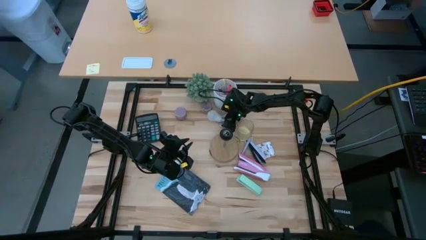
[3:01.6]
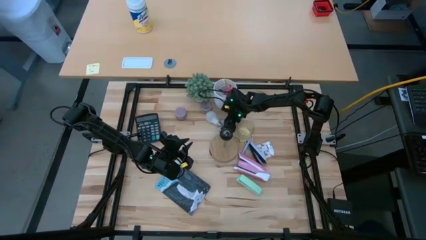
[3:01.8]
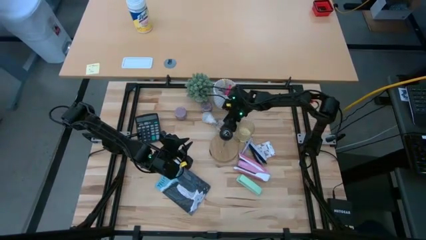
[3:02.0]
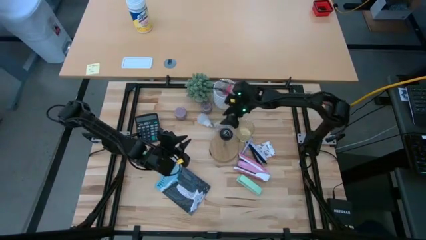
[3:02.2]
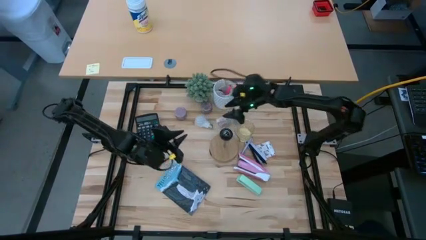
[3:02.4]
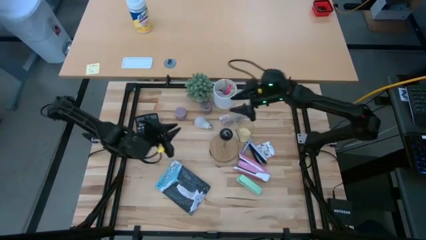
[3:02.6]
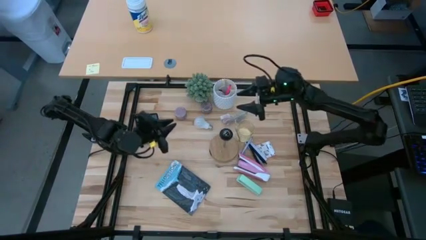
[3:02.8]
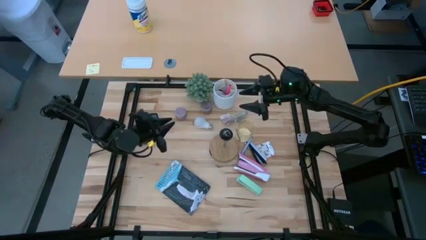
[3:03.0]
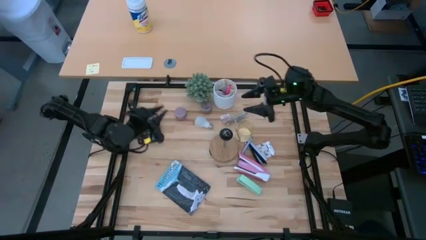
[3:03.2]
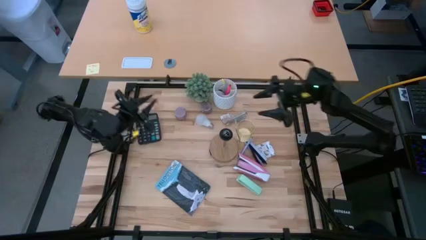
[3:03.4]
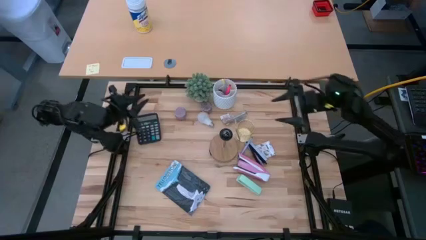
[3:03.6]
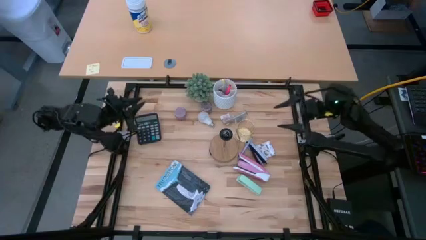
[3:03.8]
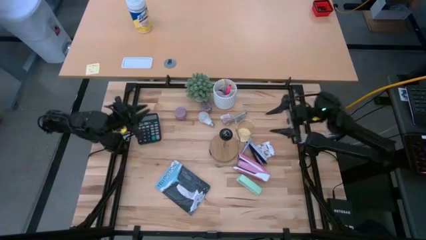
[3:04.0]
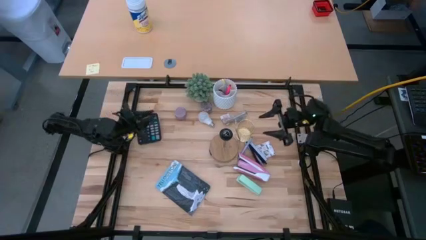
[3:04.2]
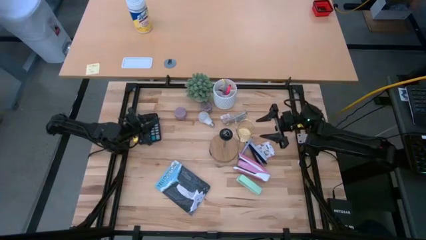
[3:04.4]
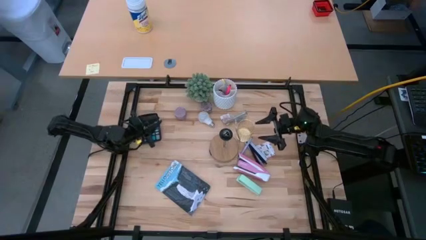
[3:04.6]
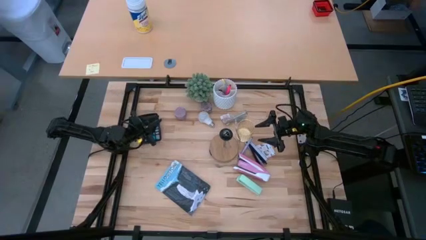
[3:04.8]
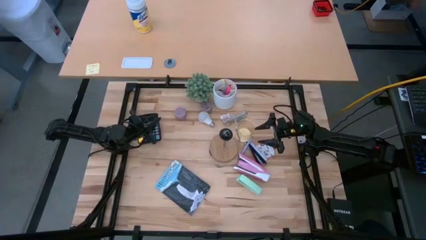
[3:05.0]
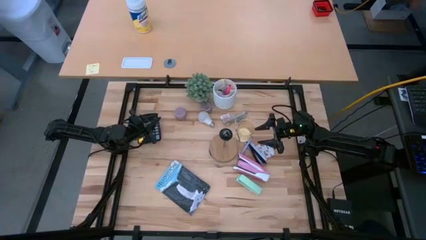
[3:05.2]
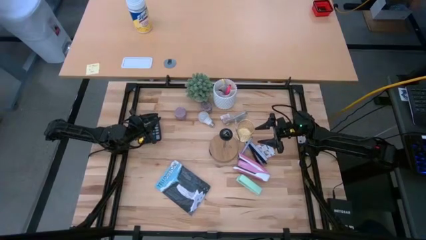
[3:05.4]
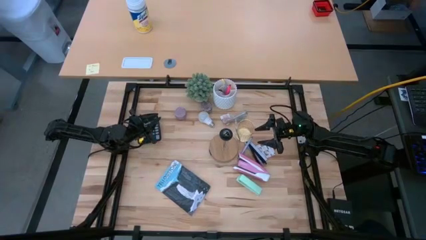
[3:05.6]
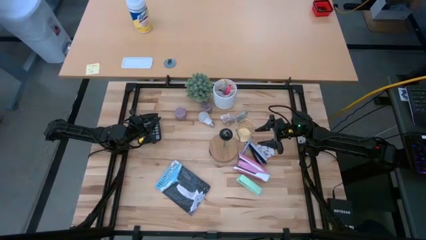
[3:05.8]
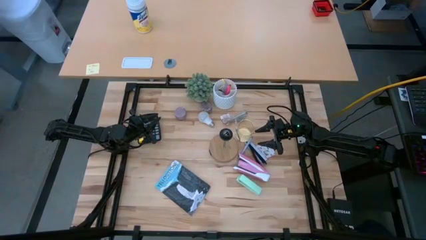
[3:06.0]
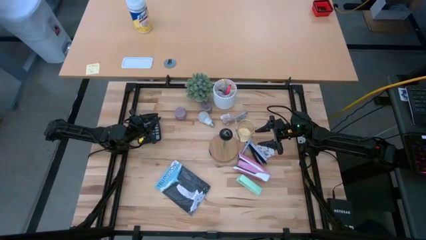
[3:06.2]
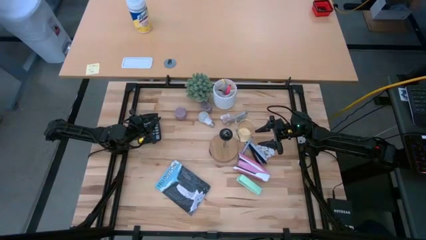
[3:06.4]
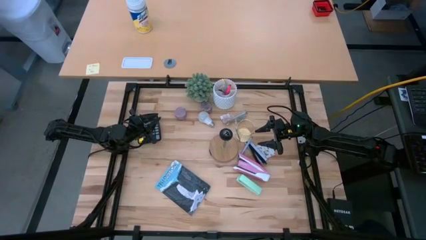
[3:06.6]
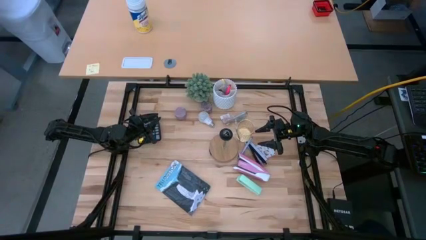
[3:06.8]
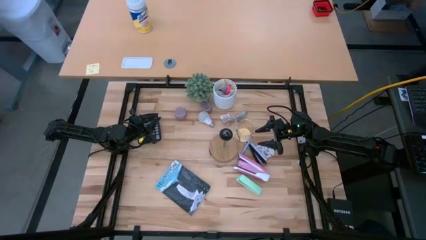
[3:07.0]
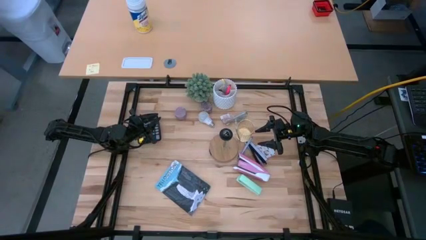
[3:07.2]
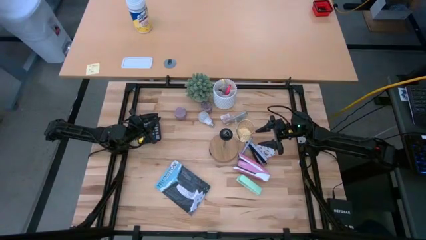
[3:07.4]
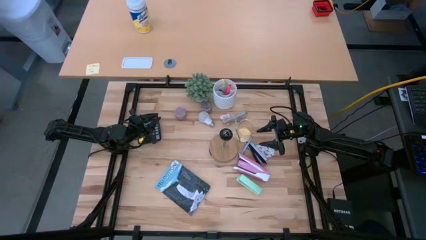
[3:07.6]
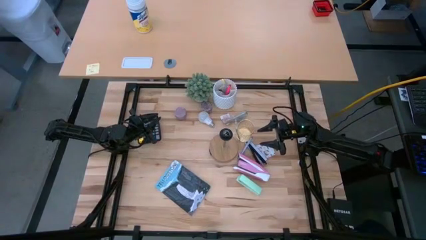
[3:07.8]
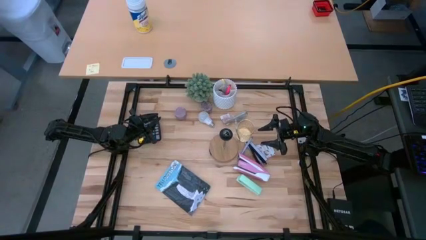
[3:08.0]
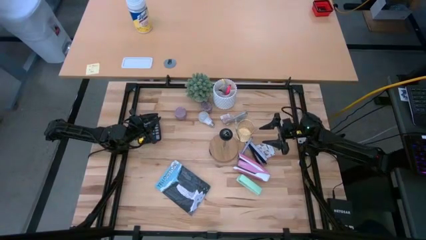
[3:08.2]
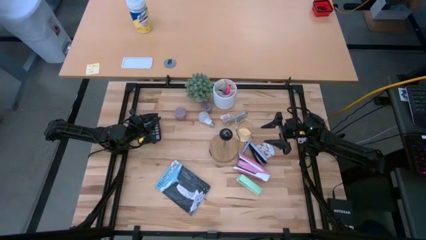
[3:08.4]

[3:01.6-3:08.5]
Task: Screw lightbulb
Return to Home Position

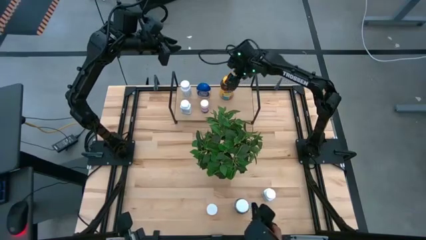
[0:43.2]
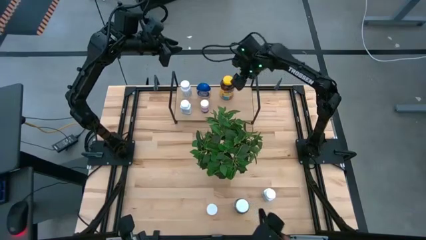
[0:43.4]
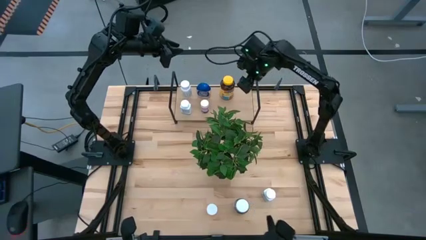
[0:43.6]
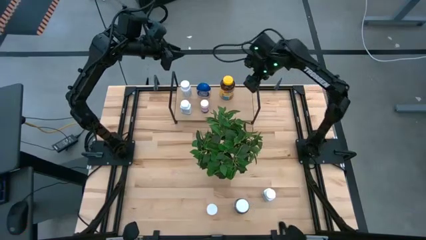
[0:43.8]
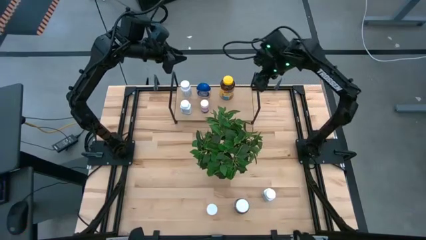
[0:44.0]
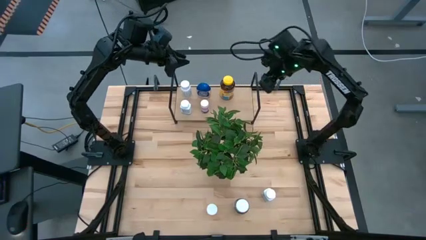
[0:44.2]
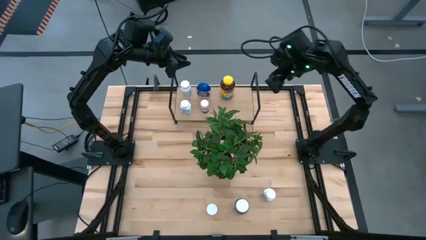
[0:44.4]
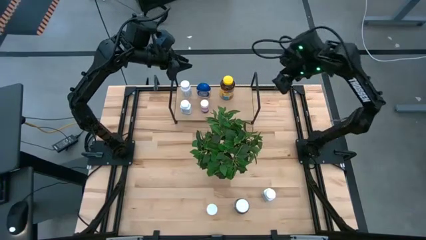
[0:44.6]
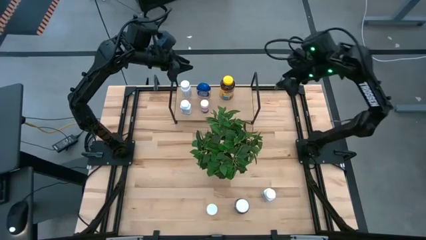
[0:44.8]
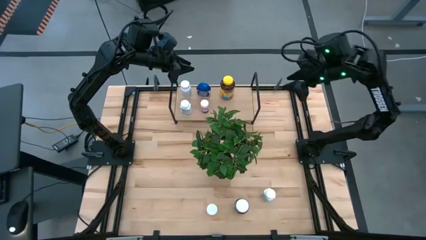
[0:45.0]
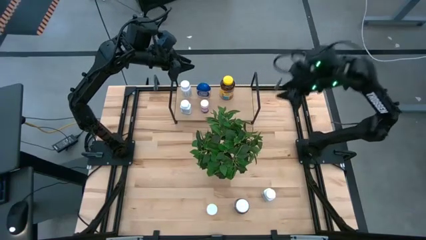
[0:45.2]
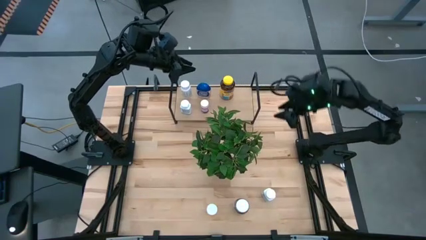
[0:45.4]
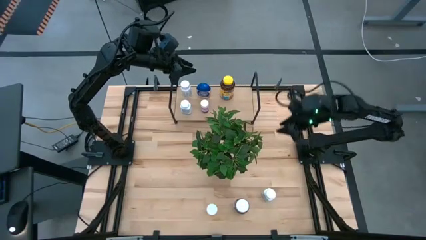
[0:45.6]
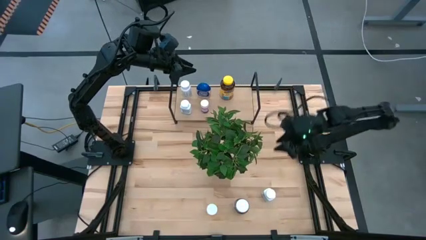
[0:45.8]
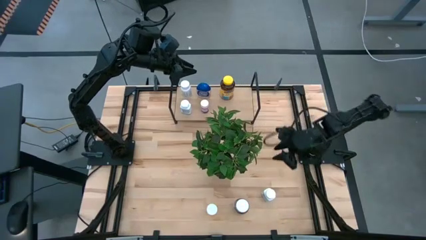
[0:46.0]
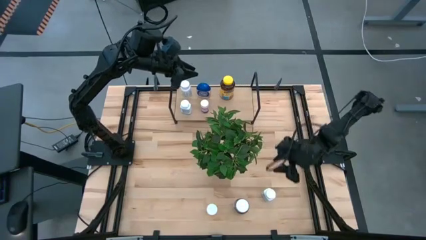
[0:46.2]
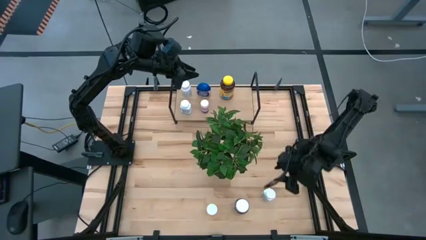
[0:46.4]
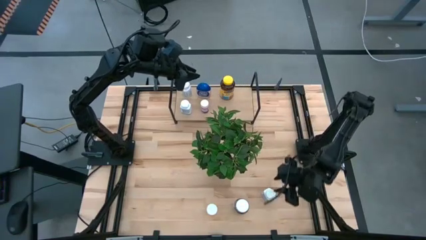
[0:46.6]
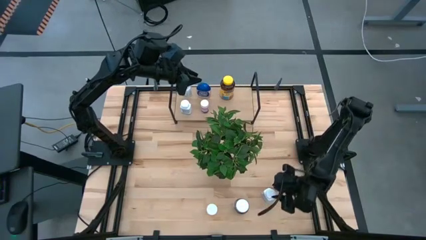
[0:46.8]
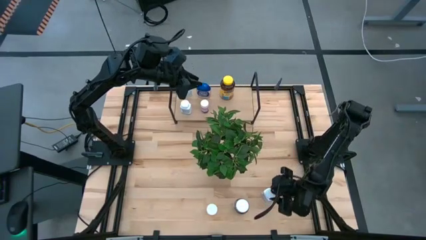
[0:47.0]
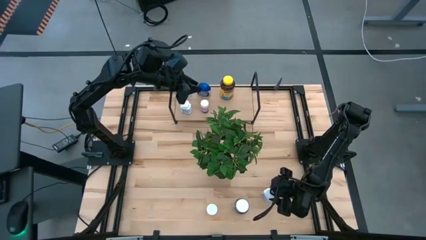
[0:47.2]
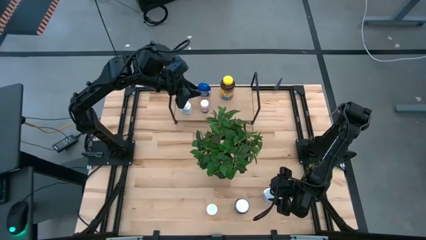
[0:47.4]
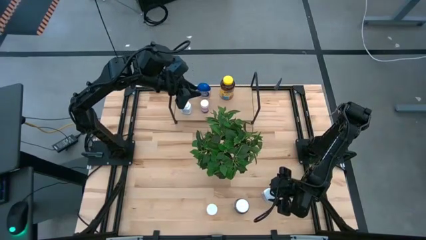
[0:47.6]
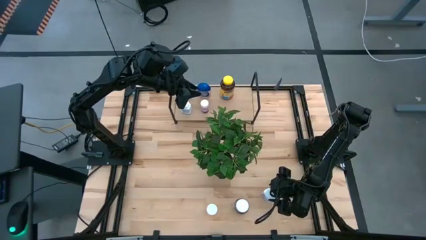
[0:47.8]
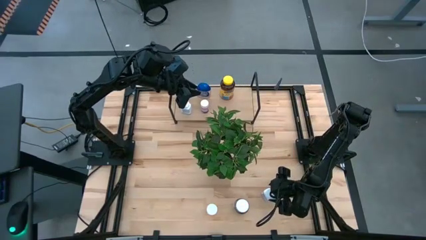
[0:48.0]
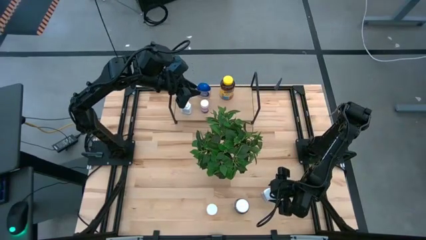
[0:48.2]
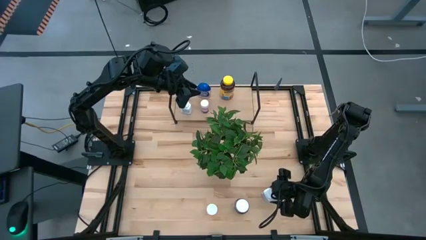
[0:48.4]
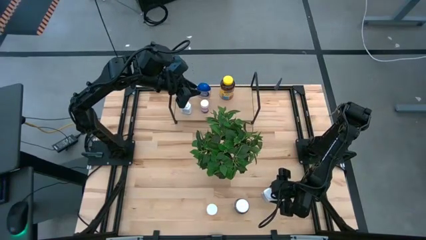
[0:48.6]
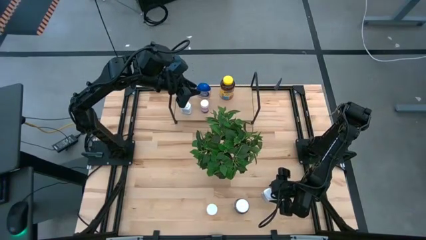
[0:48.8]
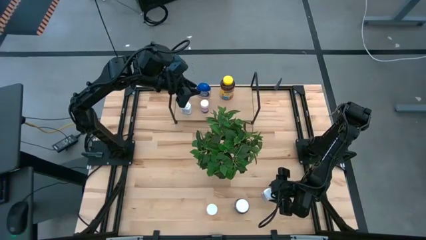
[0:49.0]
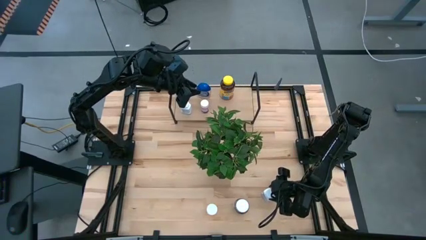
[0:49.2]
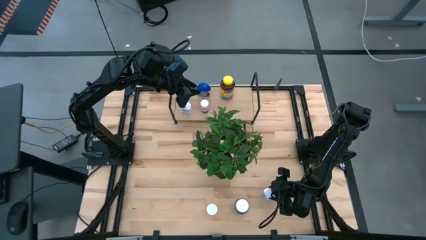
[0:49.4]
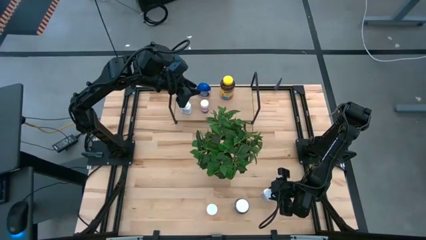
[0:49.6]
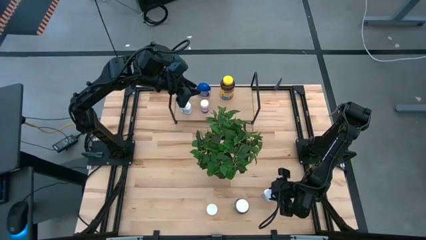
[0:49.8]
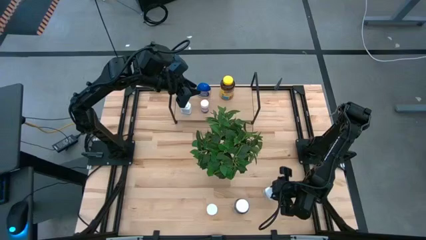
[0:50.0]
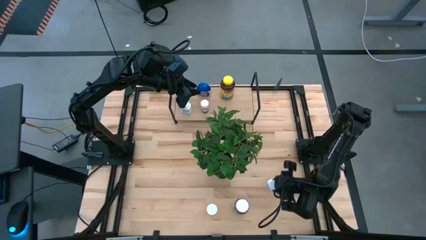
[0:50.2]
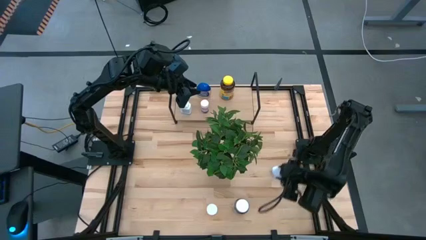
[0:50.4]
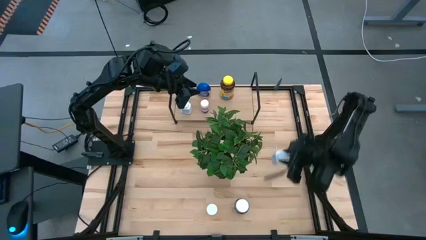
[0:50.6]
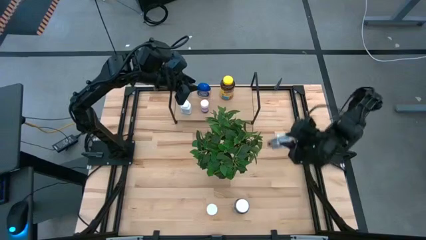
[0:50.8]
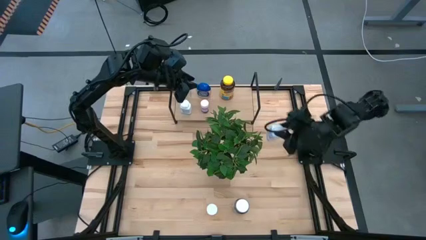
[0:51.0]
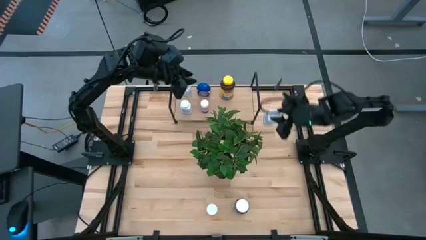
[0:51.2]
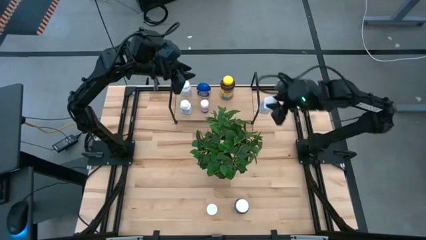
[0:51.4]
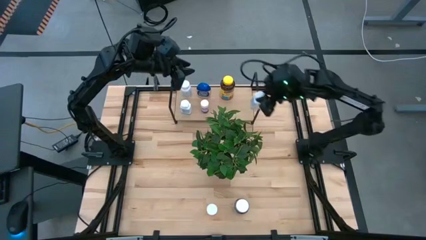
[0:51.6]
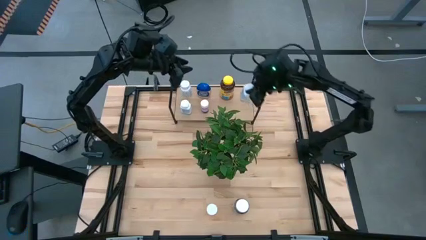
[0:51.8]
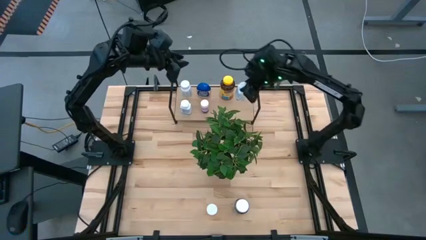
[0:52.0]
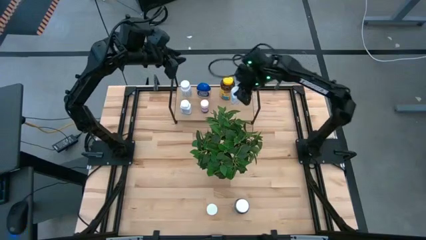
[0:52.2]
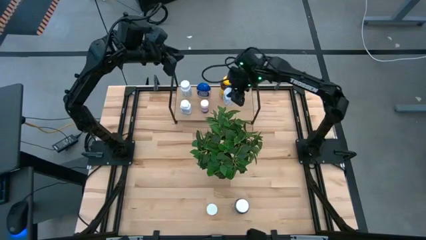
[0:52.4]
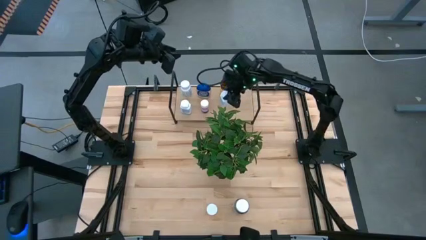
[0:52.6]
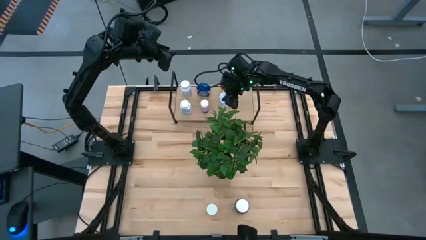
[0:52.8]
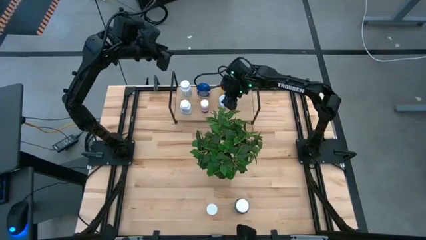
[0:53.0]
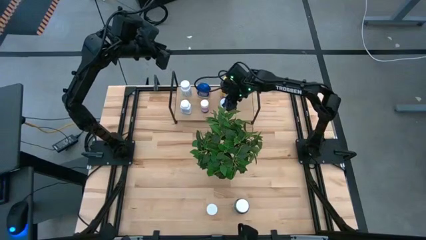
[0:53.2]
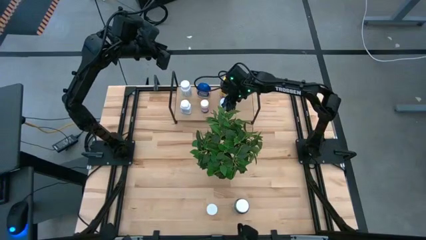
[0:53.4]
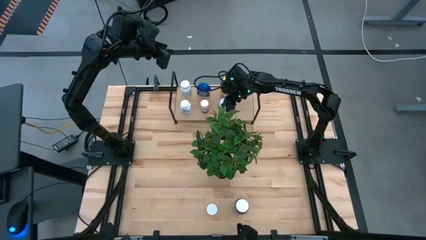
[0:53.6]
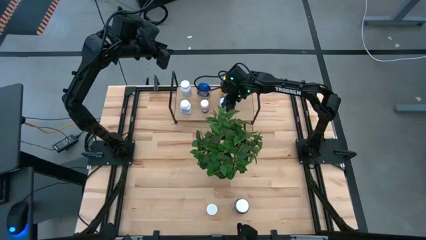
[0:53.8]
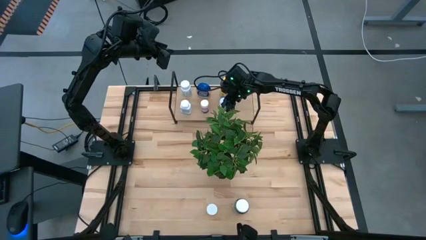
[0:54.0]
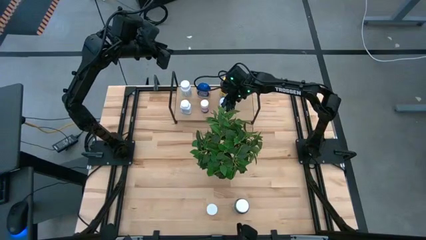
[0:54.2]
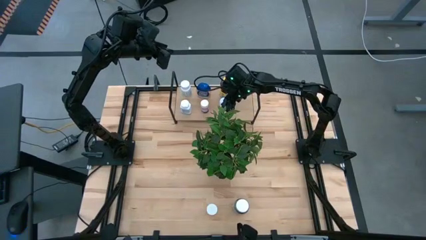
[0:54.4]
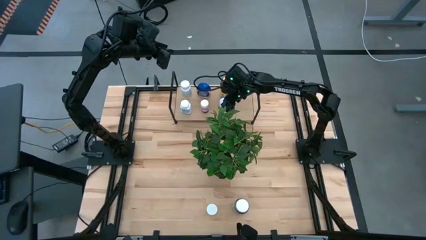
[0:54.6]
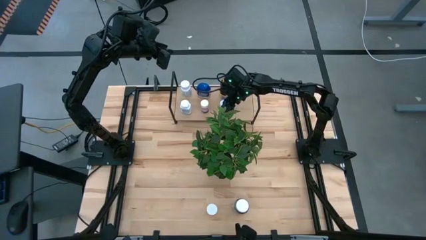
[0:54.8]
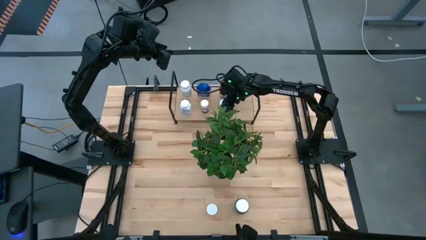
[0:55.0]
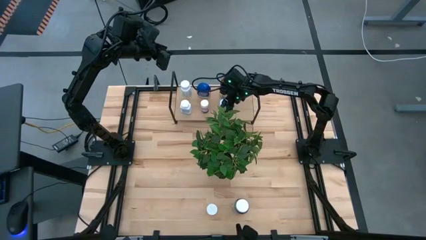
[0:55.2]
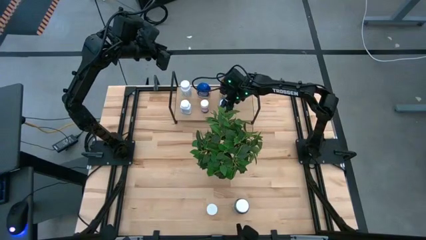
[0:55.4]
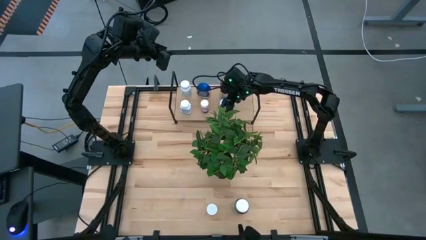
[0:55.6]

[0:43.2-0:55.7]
Task: Pick and place medicine bottles onto shelf by color
Put the white blue pill bottle on the shelf
